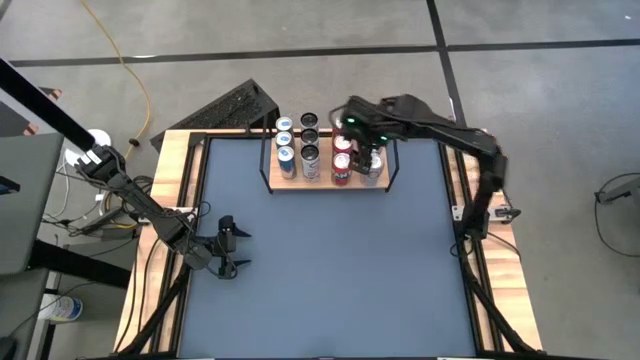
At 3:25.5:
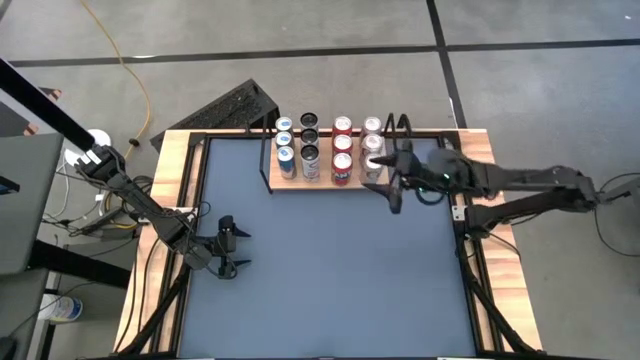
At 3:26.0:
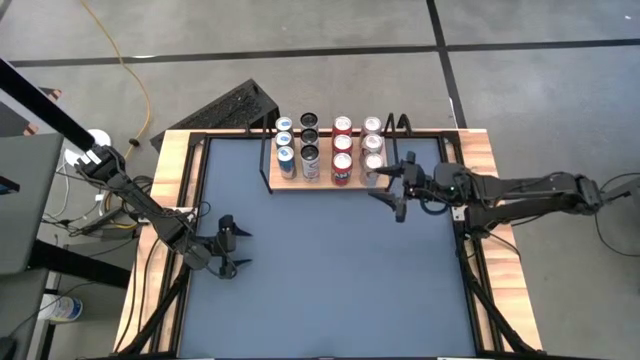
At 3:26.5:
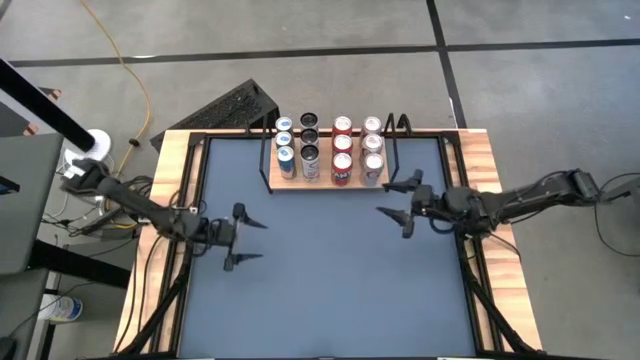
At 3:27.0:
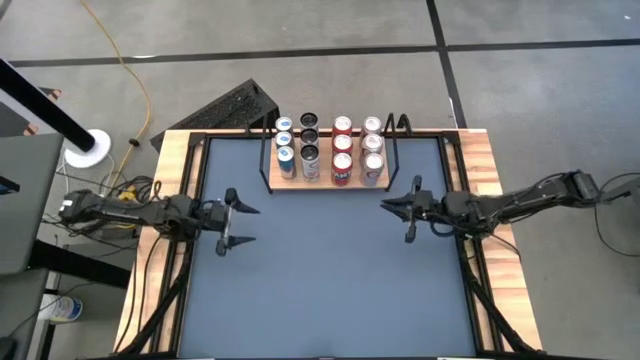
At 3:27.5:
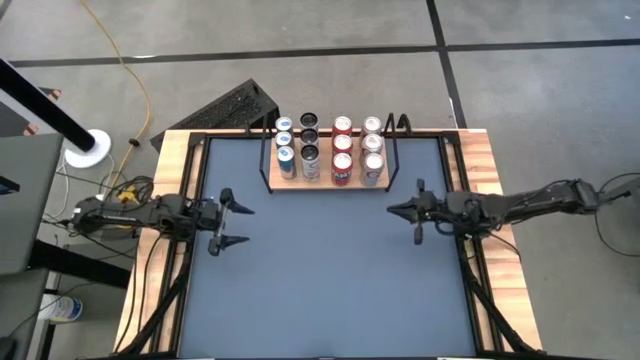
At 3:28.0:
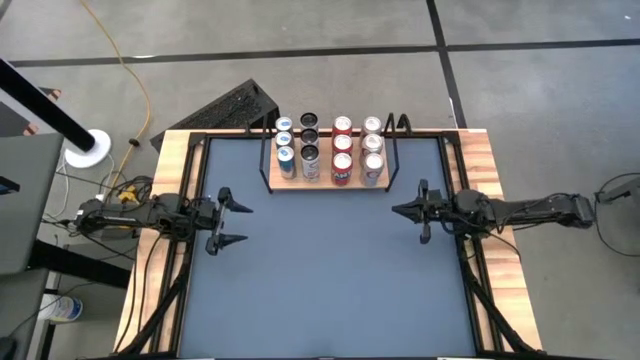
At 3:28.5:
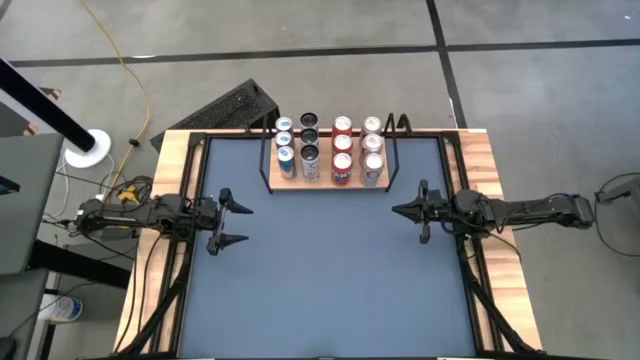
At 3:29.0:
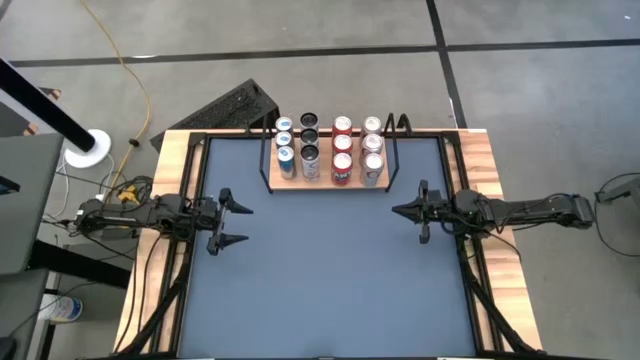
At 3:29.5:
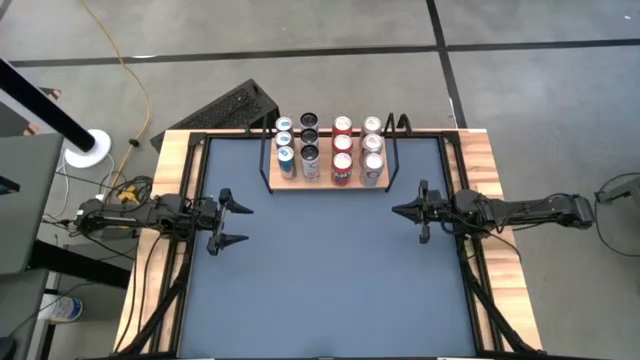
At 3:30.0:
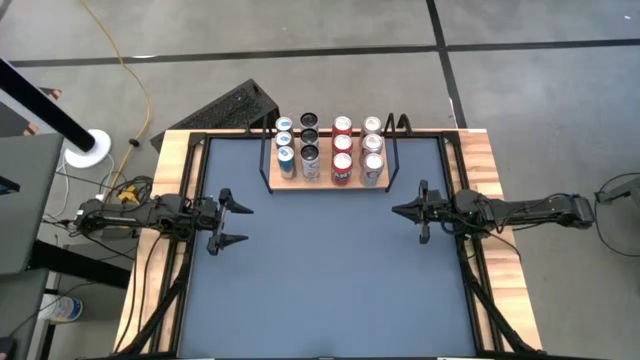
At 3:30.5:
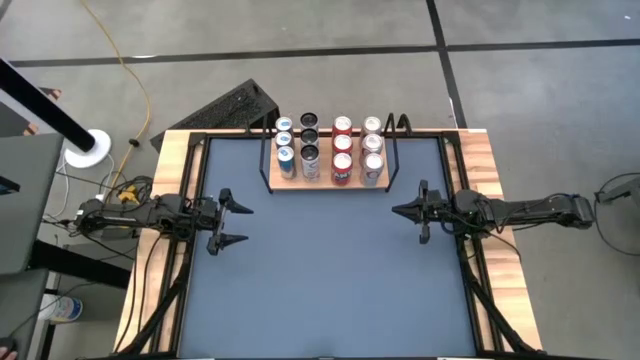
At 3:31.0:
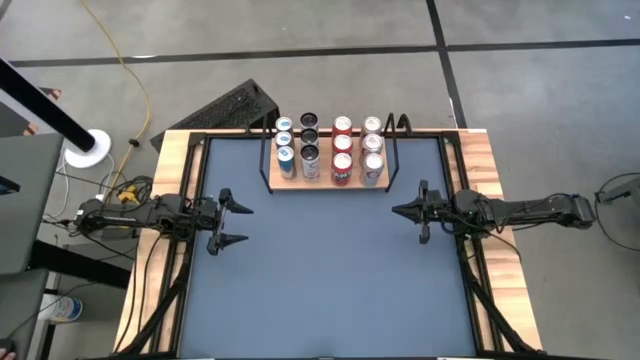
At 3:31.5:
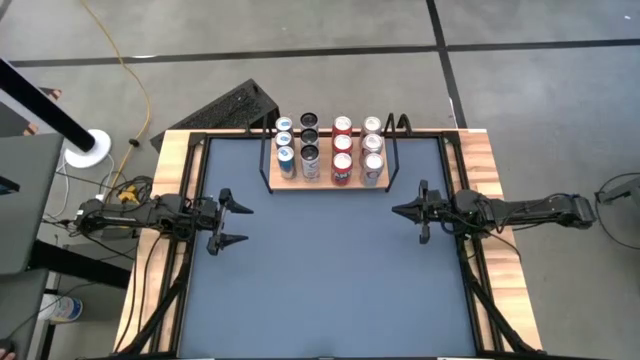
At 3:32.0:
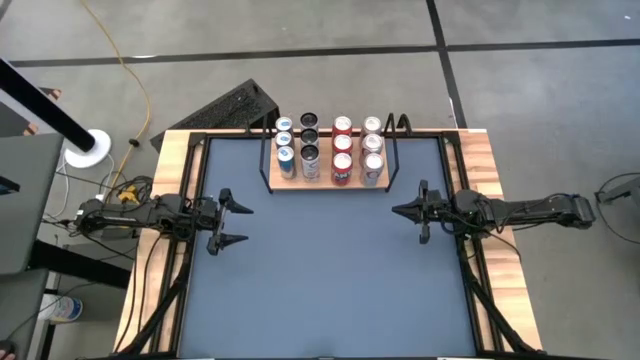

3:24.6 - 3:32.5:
Task: Place canned beverage on shelf
Return to Home Position

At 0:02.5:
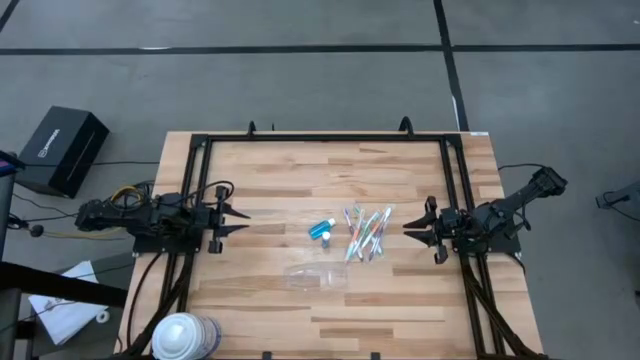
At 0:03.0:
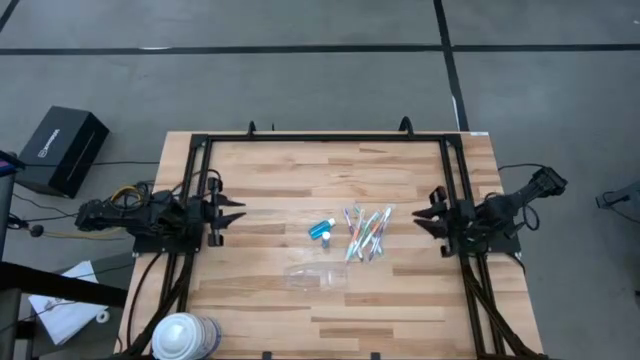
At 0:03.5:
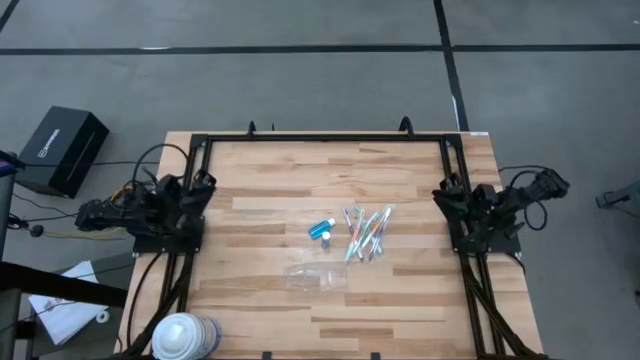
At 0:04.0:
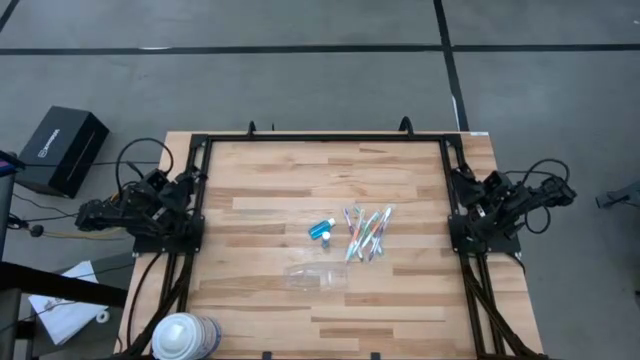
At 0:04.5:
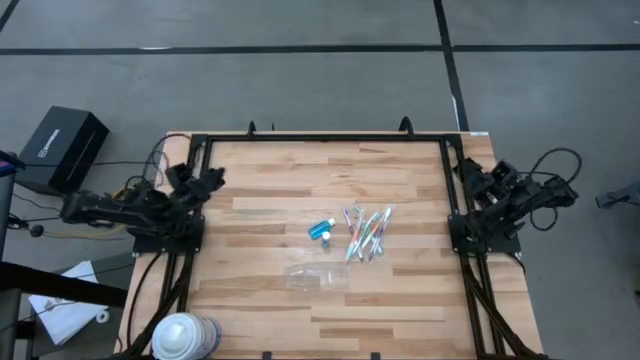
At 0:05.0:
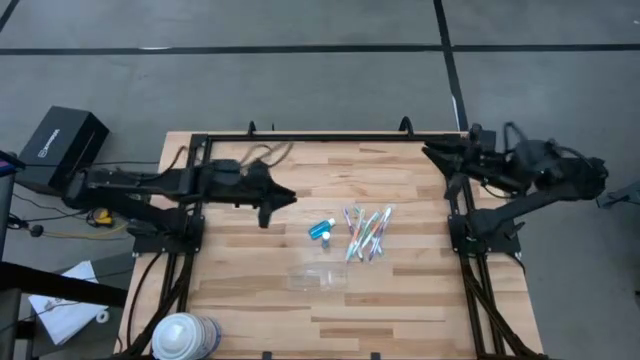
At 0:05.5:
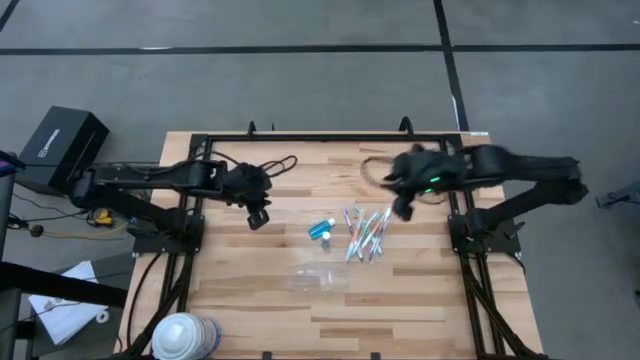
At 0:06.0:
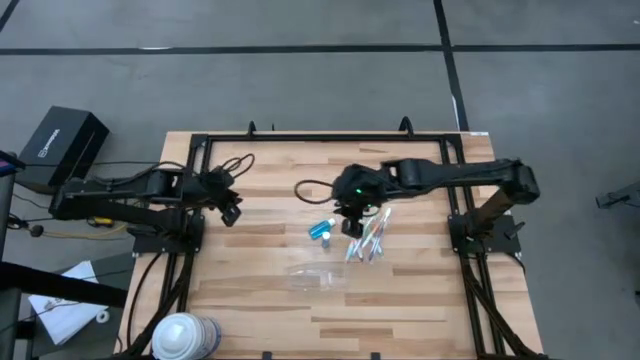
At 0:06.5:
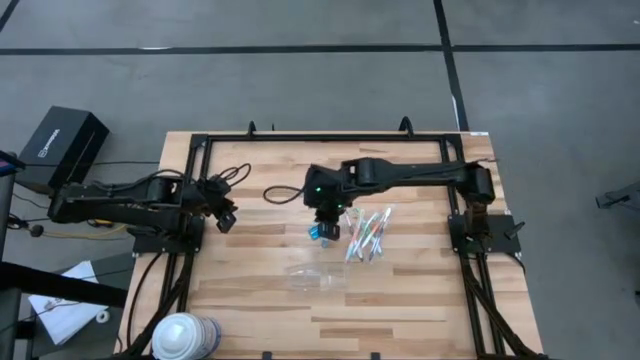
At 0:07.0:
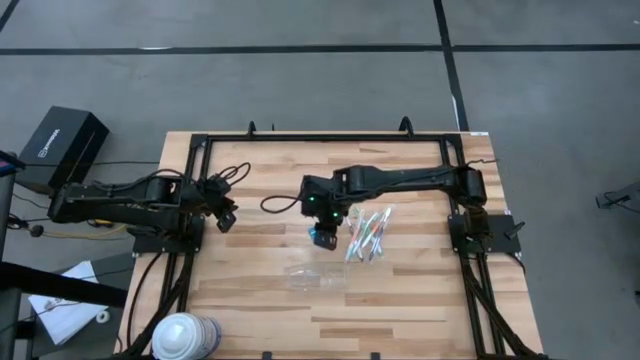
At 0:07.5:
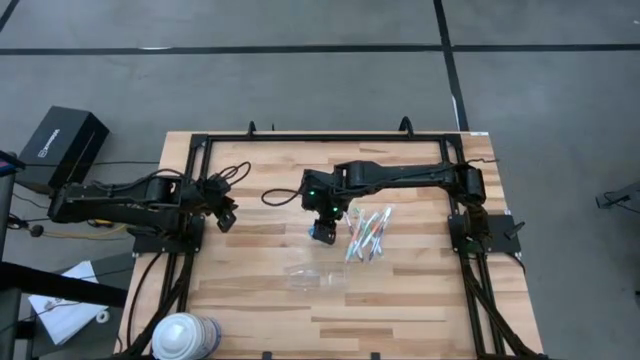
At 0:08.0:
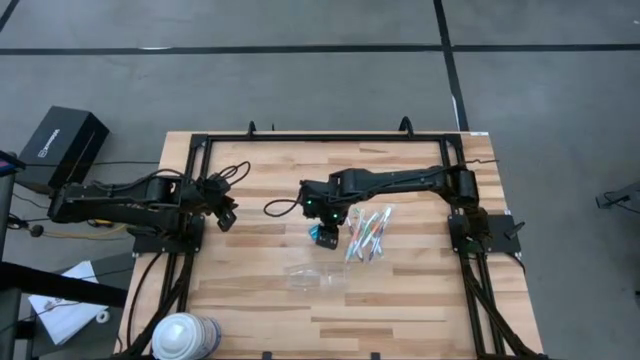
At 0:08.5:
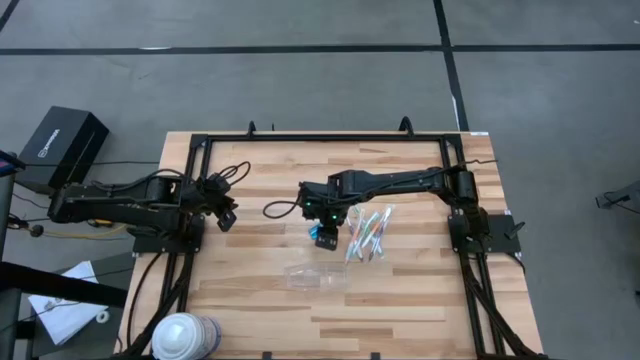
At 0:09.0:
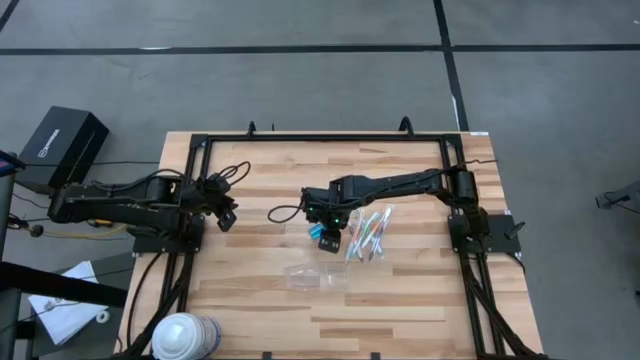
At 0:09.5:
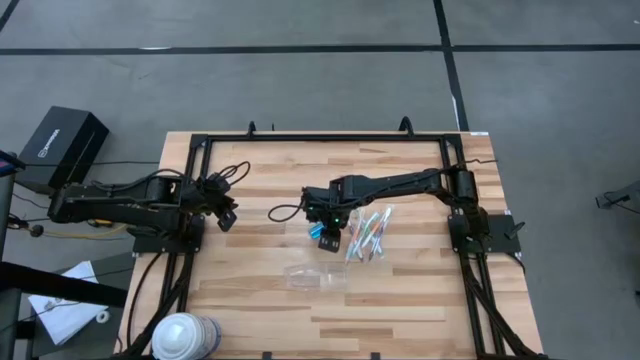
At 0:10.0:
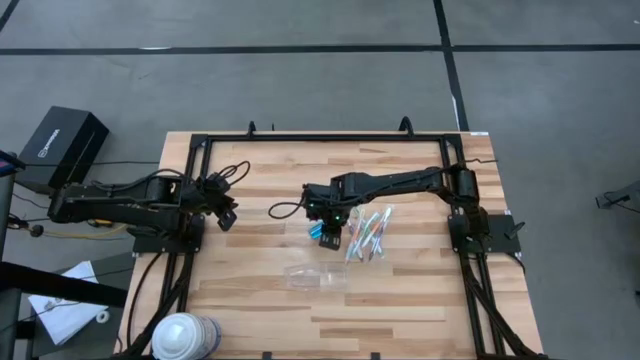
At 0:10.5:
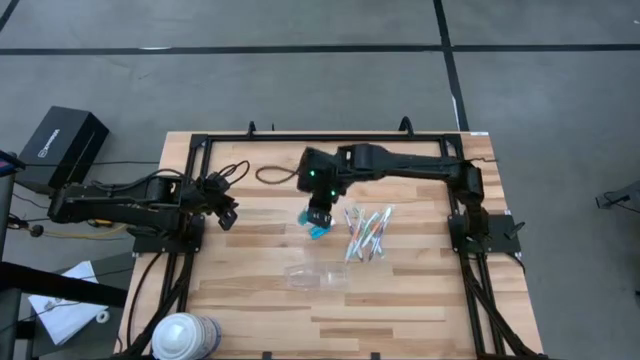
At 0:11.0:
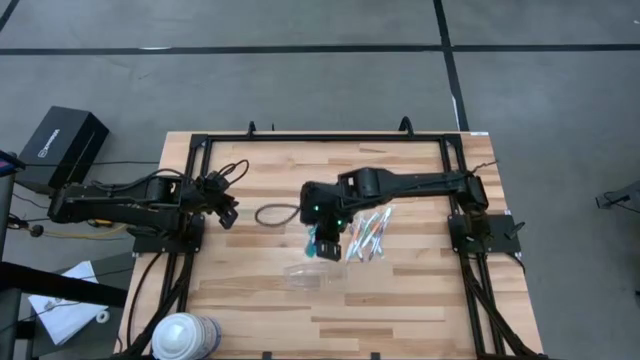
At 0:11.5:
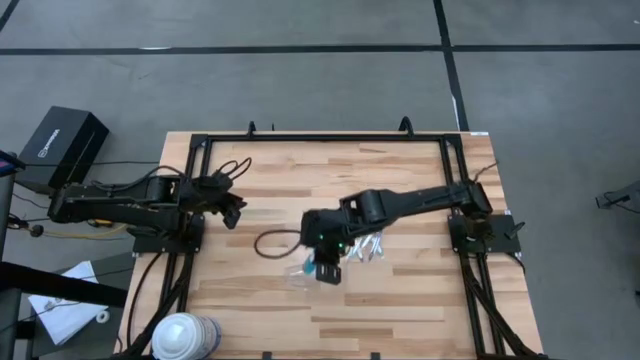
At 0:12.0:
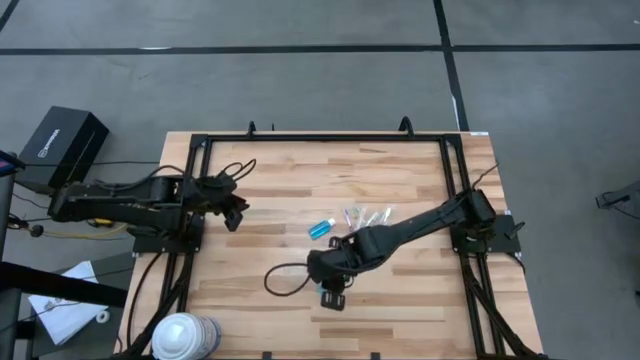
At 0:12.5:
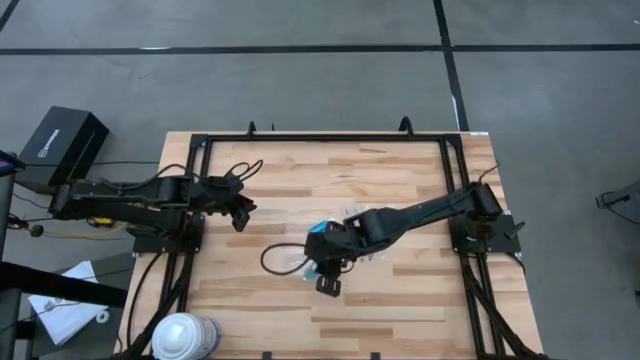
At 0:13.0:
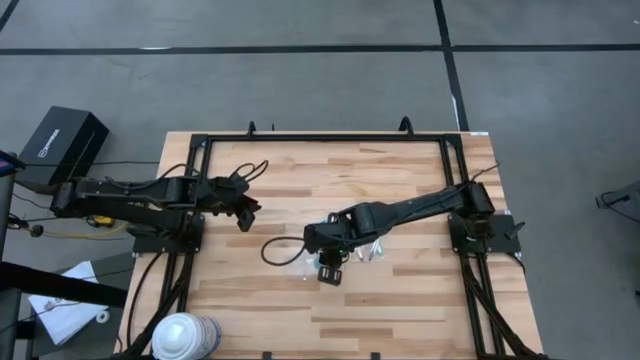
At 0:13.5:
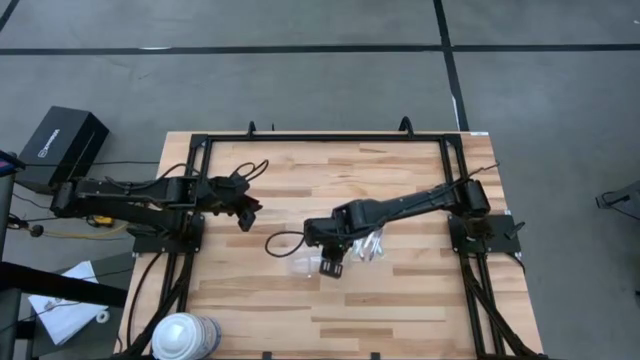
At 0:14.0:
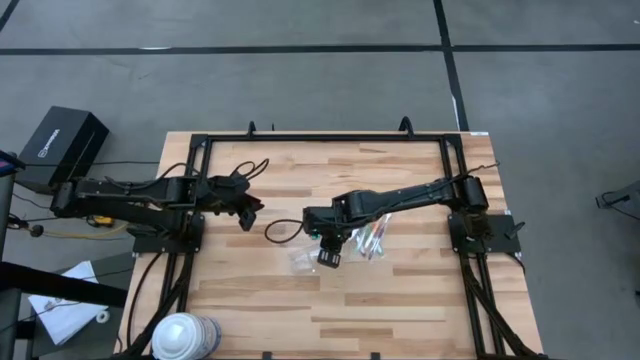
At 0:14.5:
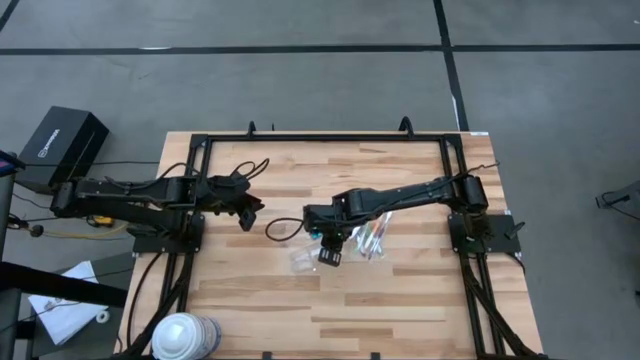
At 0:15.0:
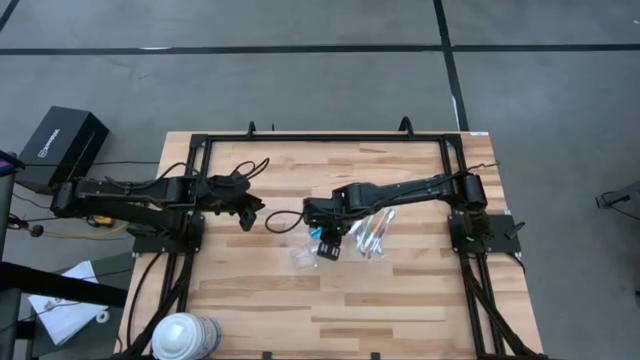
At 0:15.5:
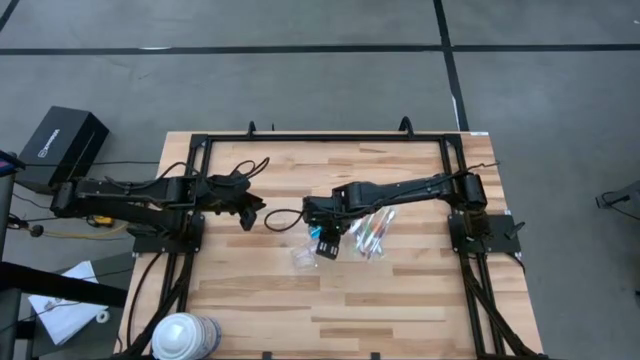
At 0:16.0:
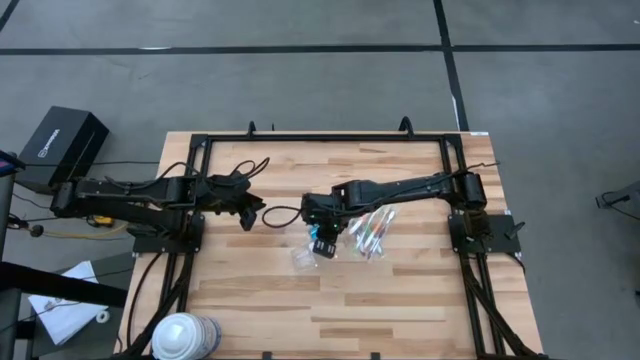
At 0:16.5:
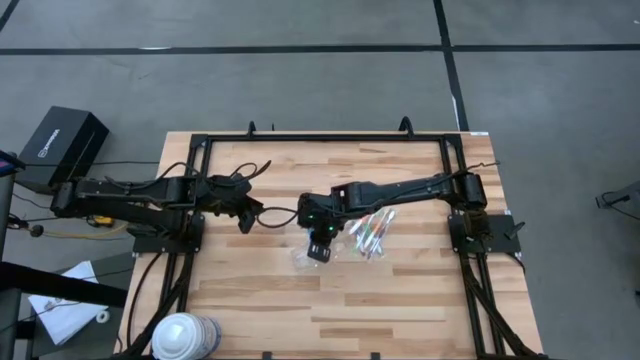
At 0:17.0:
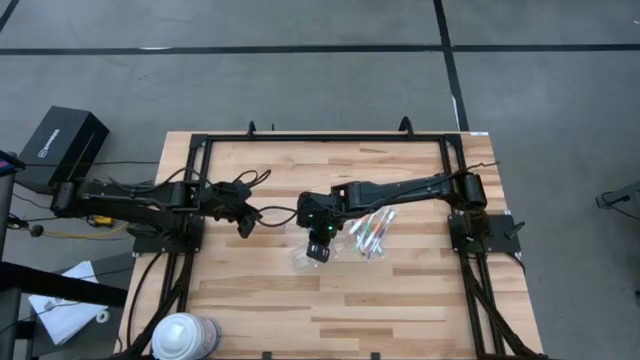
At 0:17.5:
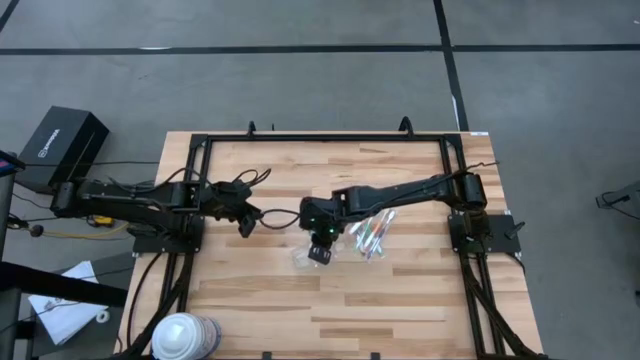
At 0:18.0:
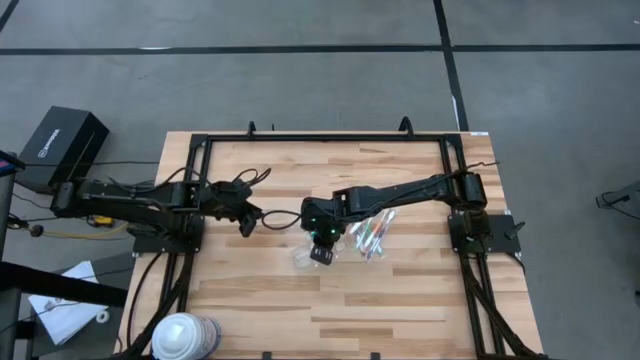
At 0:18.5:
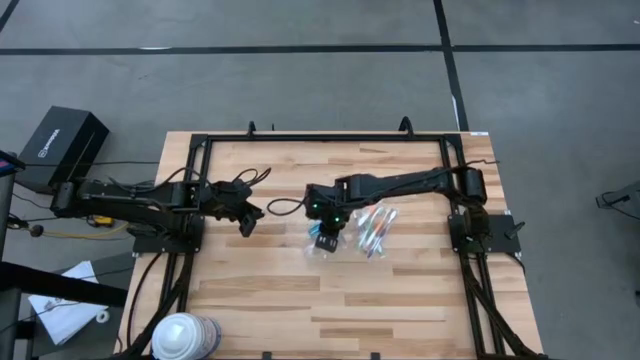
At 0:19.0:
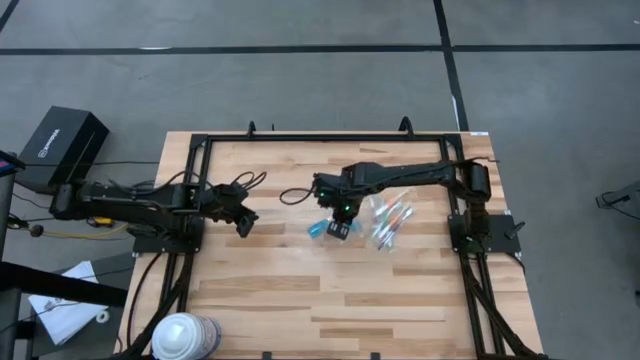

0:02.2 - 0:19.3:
Task: Pick & Place toothbrushing station
Put the blue mouthwash into the transparent organizer
